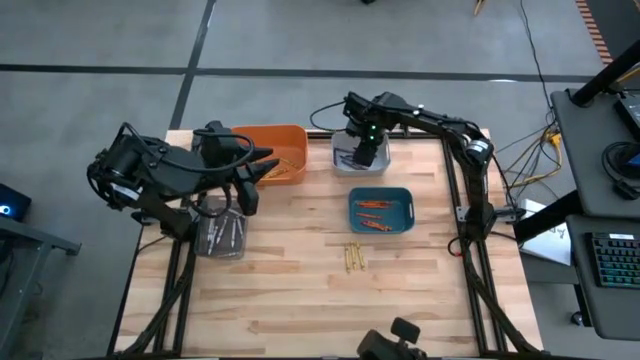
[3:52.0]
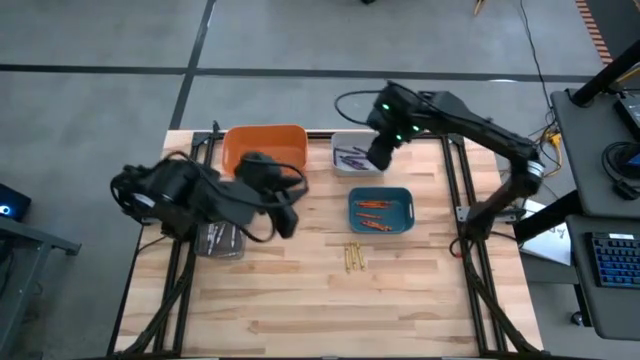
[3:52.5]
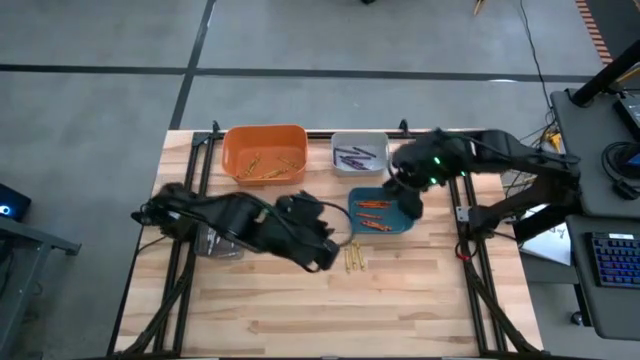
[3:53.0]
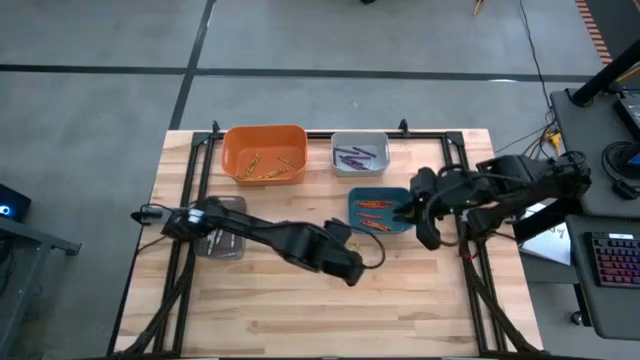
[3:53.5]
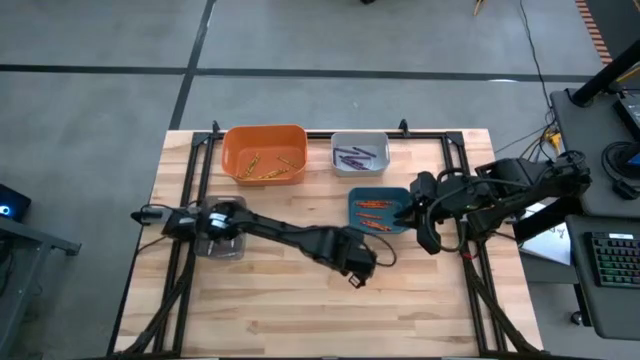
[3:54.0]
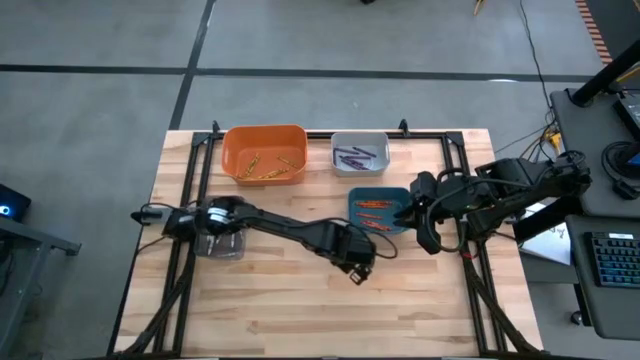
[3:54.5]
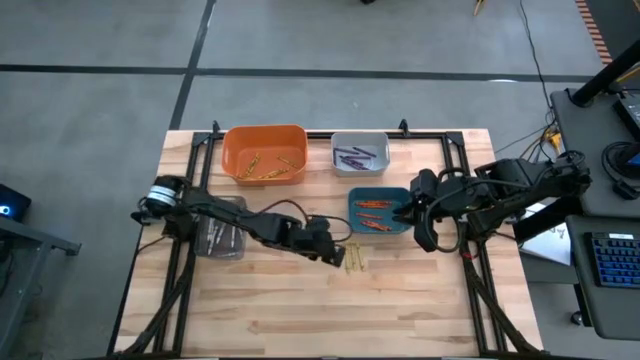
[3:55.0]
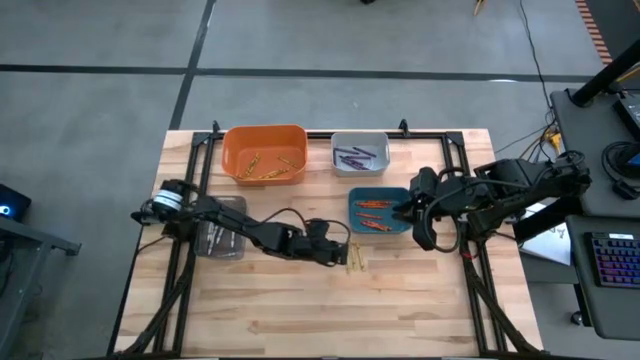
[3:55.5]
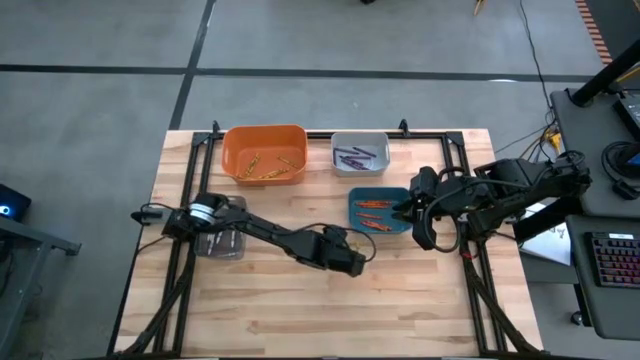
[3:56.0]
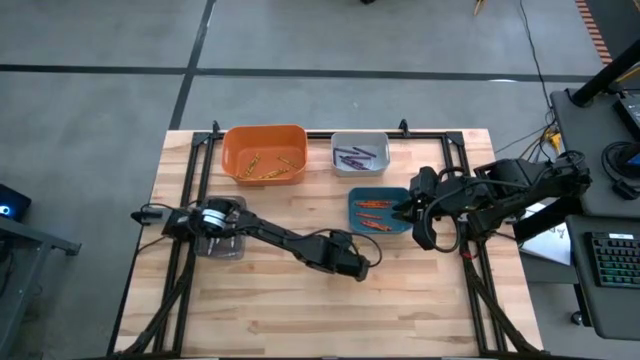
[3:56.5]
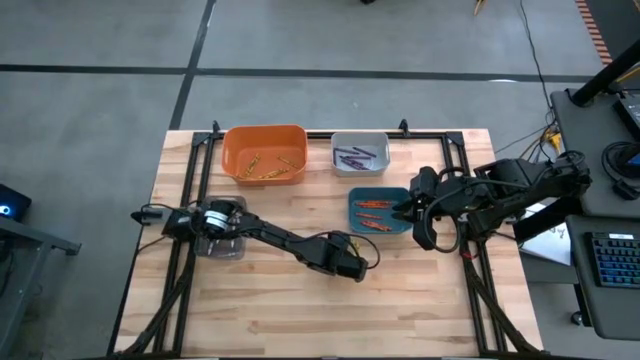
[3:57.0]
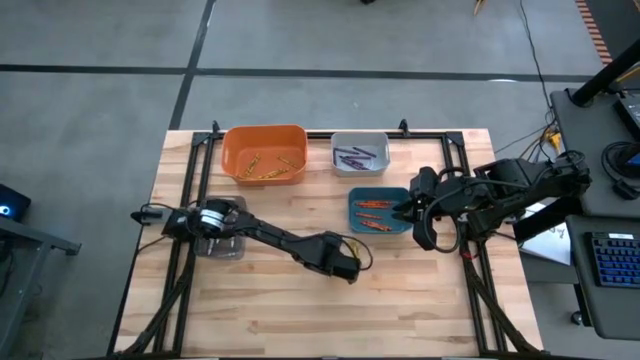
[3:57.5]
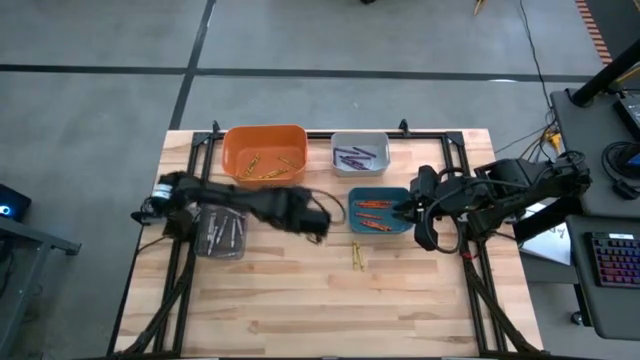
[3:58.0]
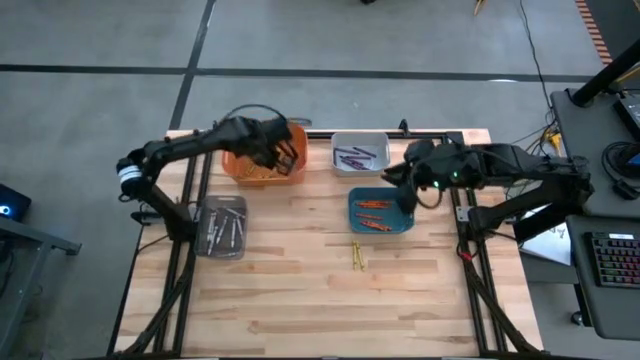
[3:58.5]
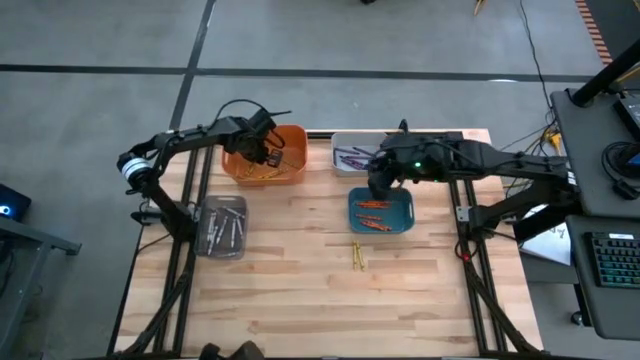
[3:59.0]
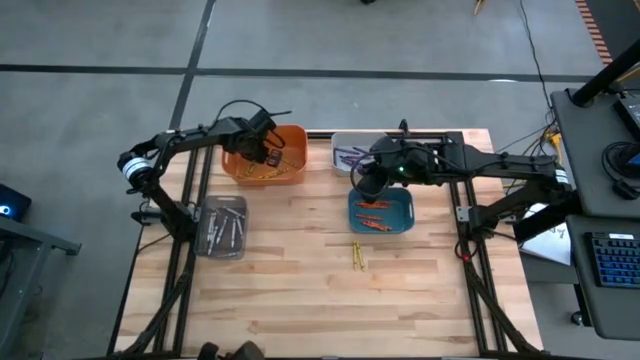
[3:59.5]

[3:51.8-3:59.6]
Task: Sort crayons
Put the yellow crayon into the orange bin

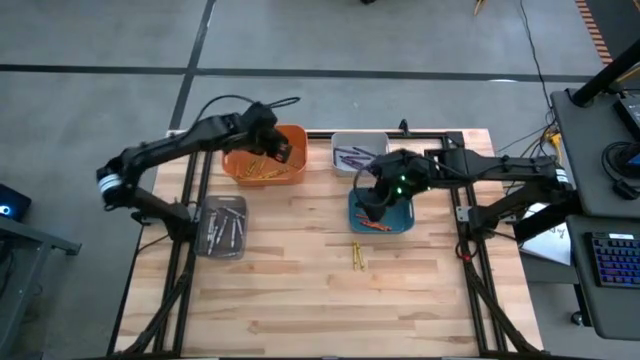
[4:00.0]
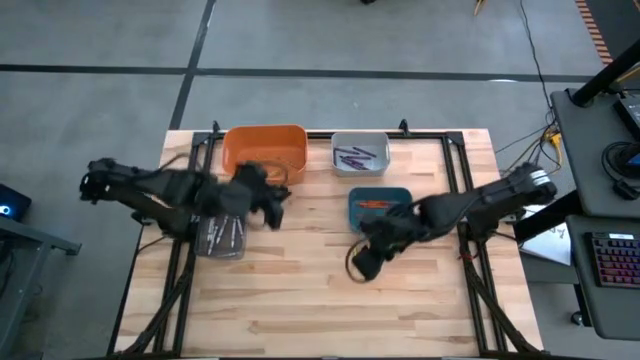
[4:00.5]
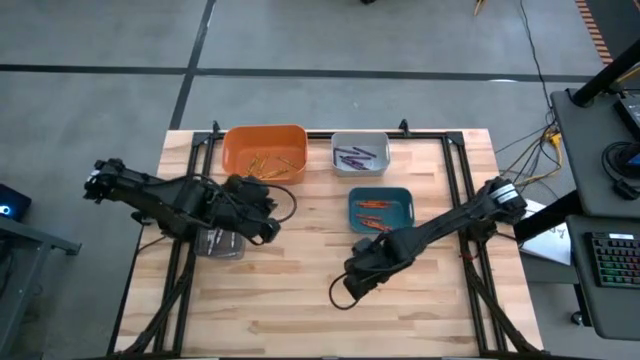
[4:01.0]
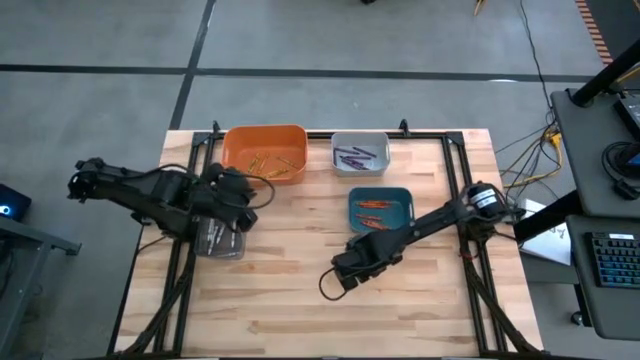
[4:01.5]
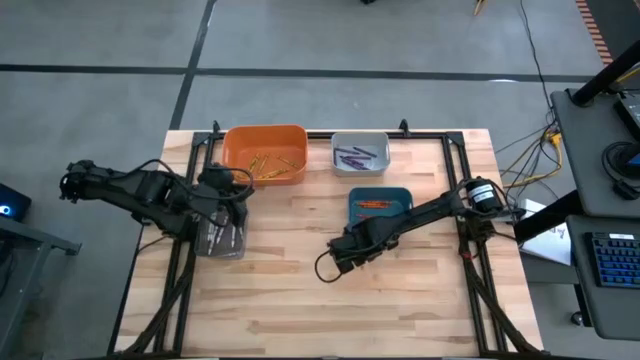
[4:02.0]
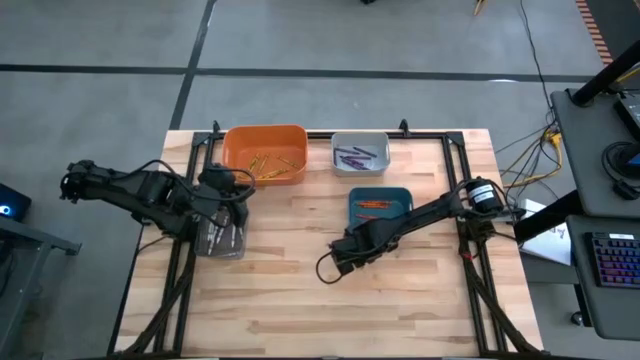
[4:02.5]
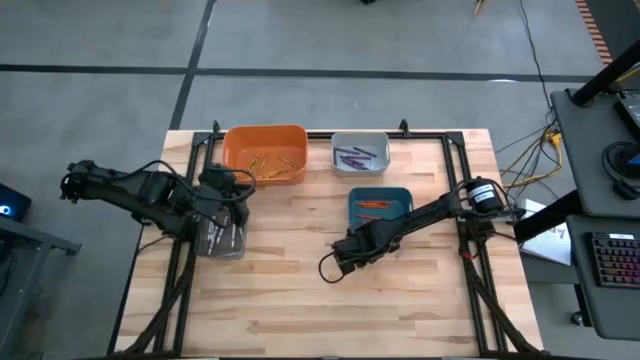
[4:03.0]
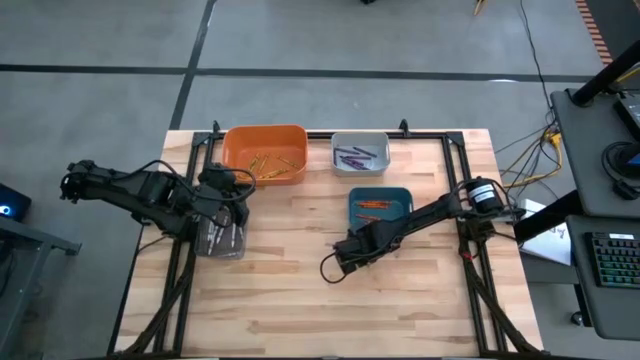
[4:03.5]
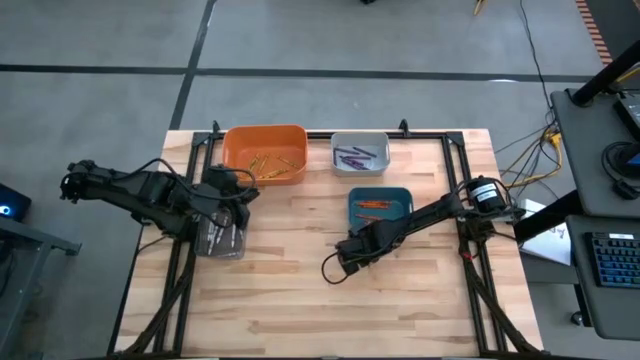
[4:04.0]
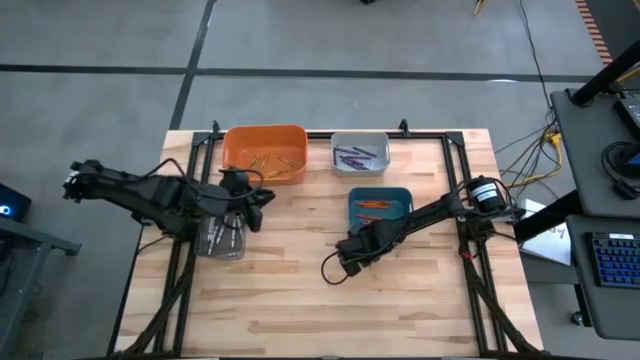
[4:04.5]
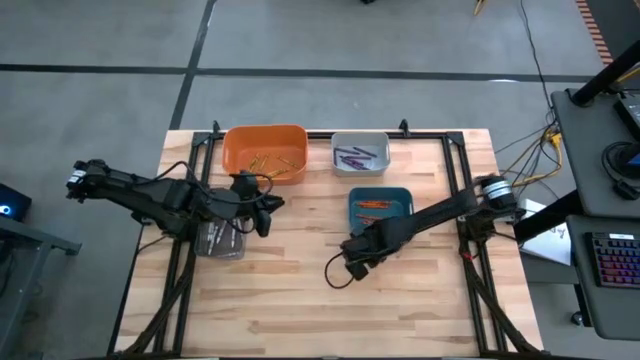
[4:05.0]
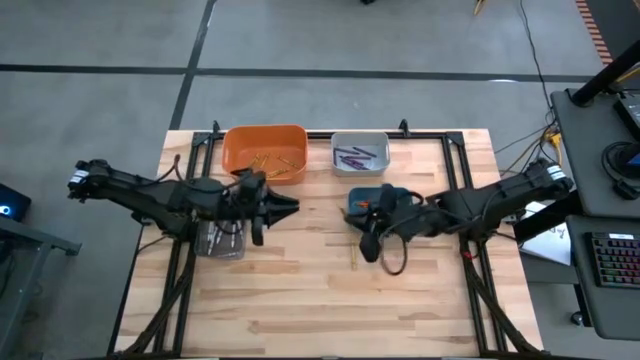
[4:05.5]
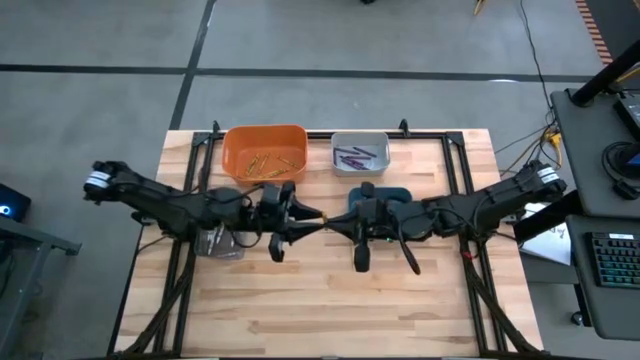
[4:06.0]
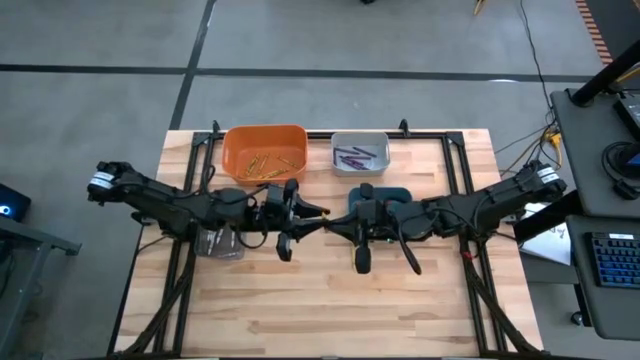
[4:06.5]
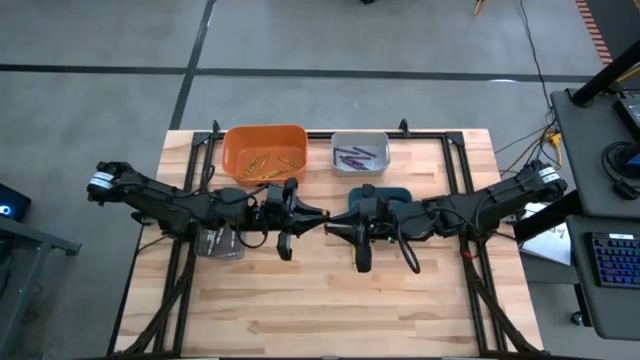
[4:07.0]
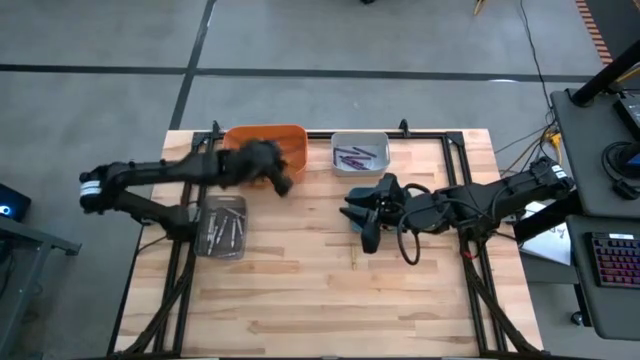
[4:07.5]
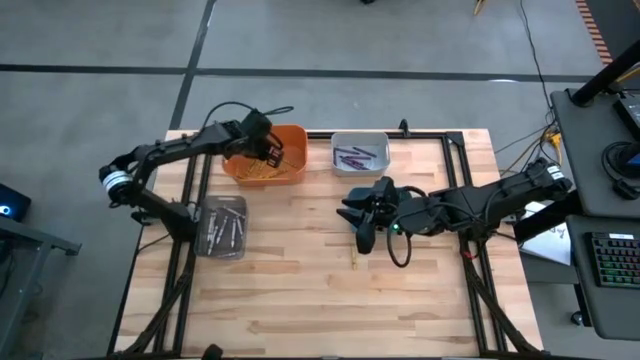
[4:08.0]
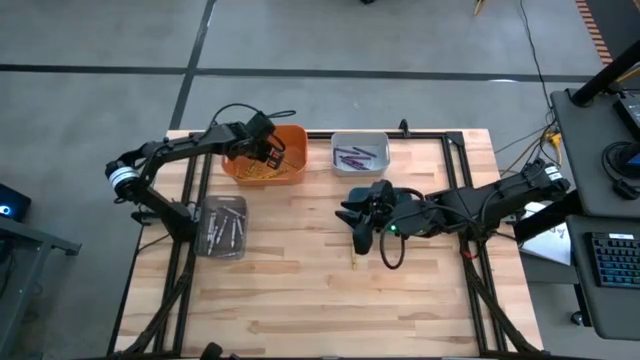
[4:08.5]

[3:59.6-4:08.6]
Put the yellow crayon into the orange bin

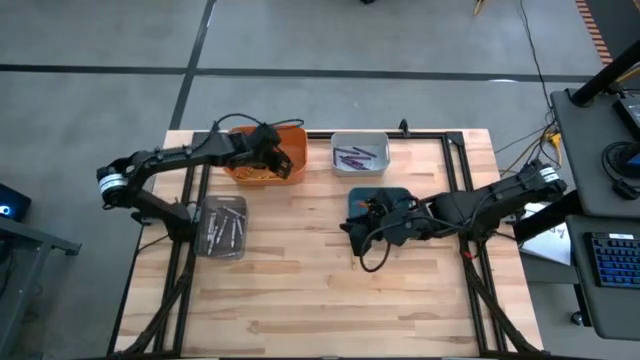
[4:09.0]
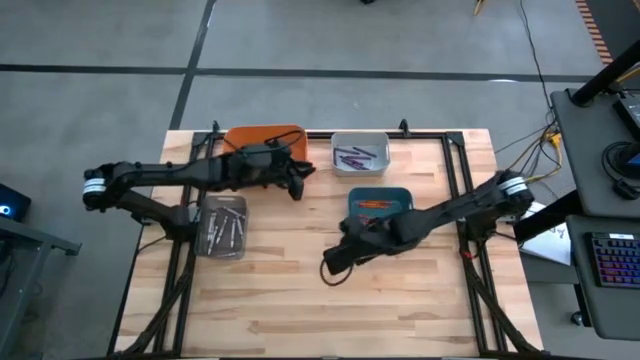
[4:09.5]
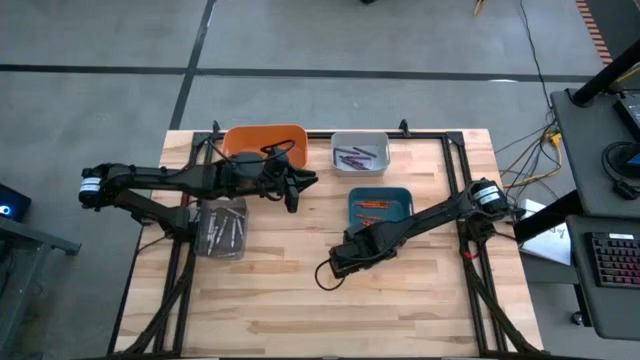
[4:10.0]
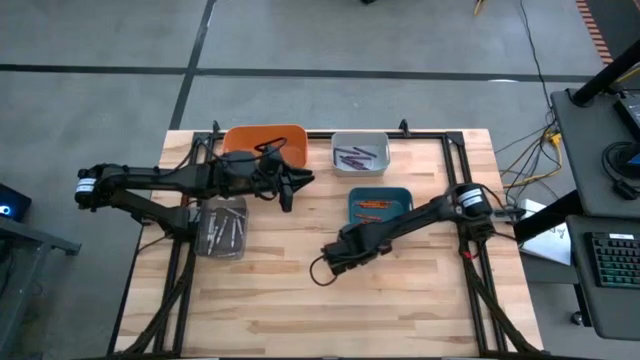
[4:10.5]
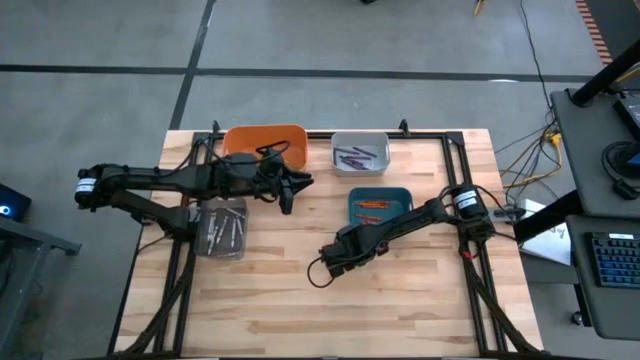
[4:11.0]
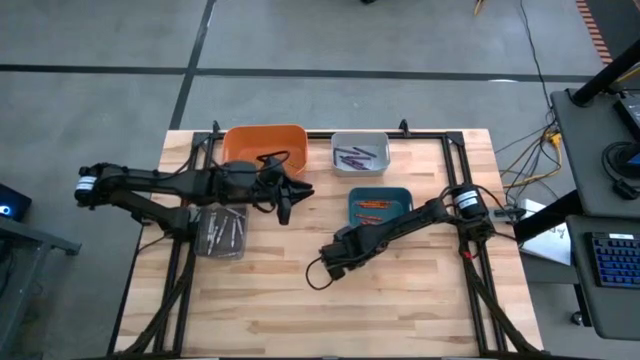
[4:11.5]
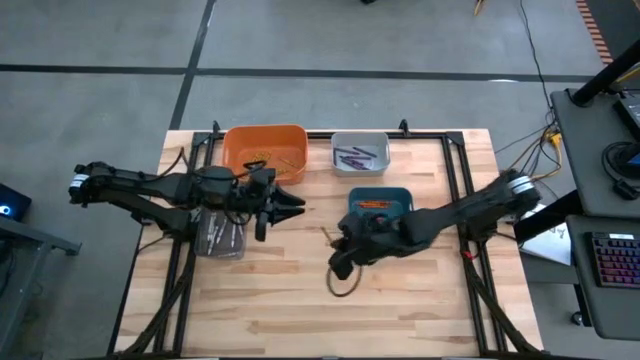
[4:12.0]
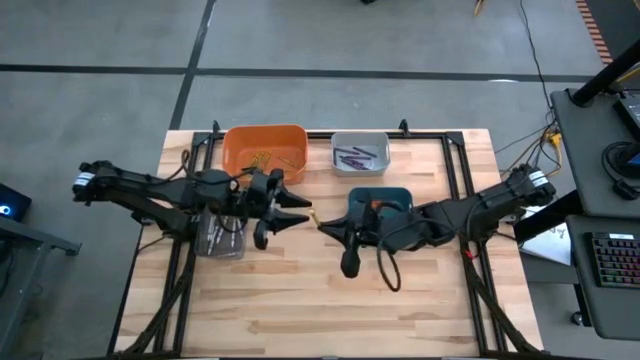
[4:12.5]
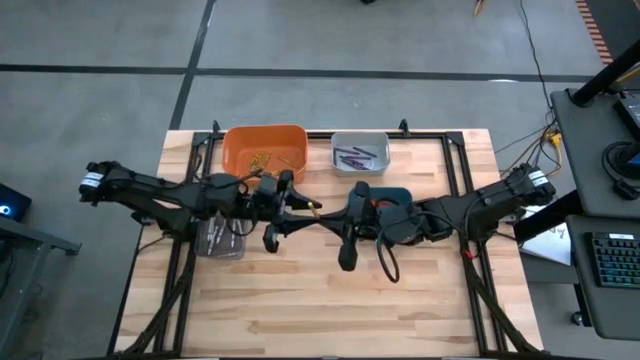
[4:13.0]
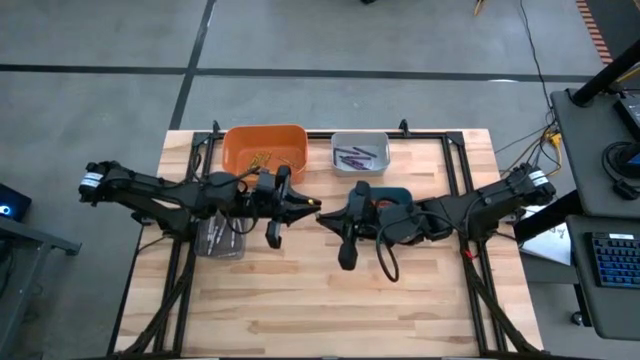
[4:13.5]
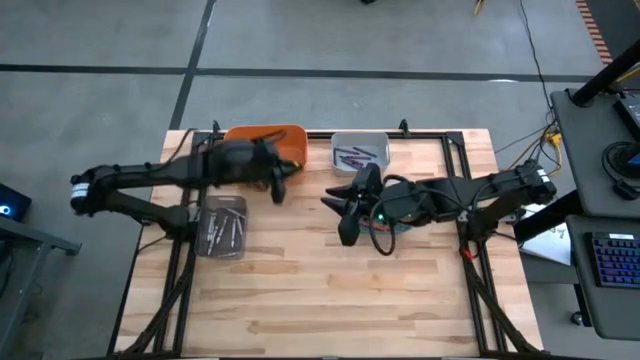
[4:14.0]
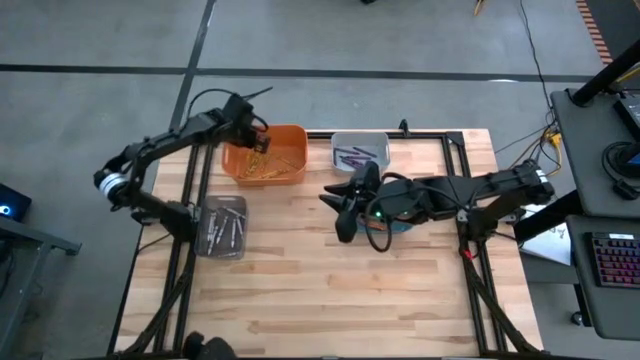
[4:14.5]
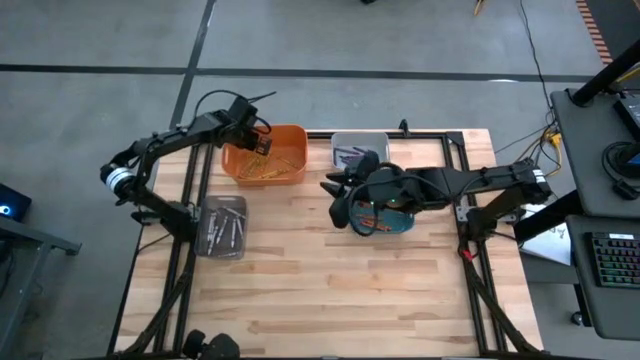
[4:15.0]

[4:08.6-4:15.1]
Put the yellow crayon into the orange bin
